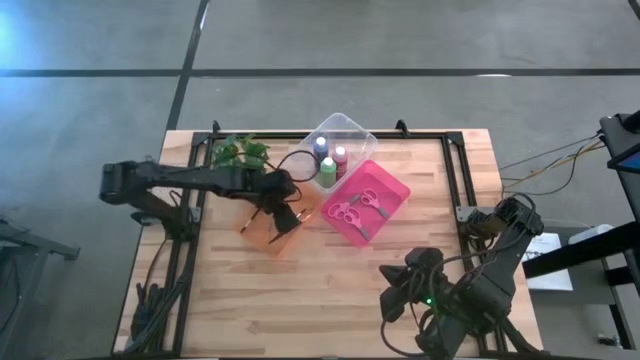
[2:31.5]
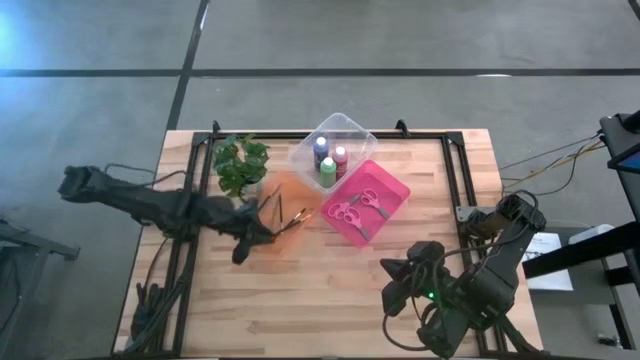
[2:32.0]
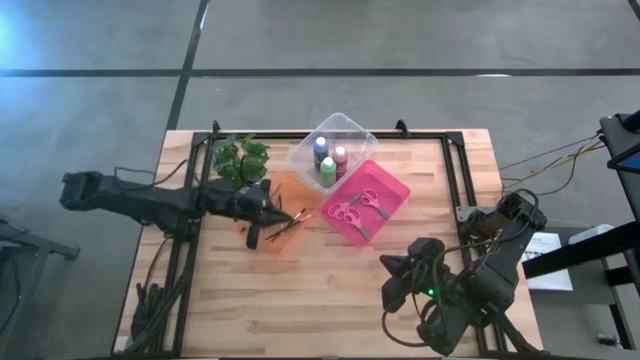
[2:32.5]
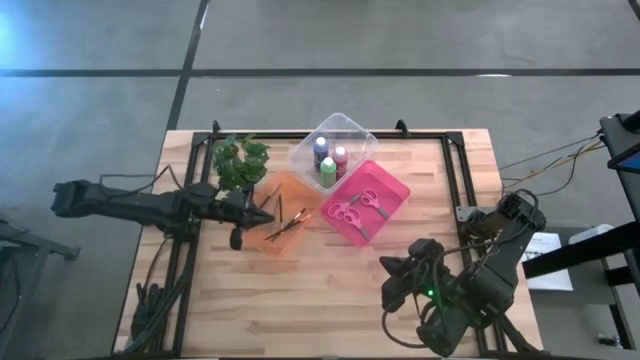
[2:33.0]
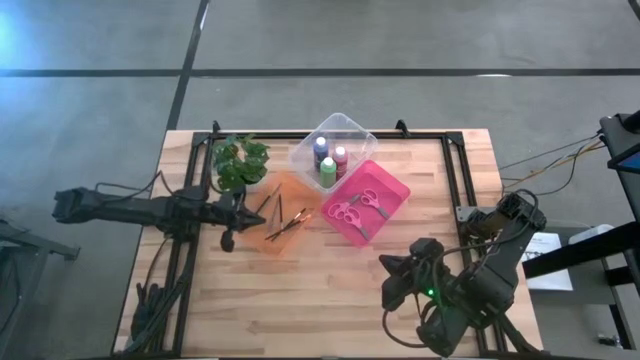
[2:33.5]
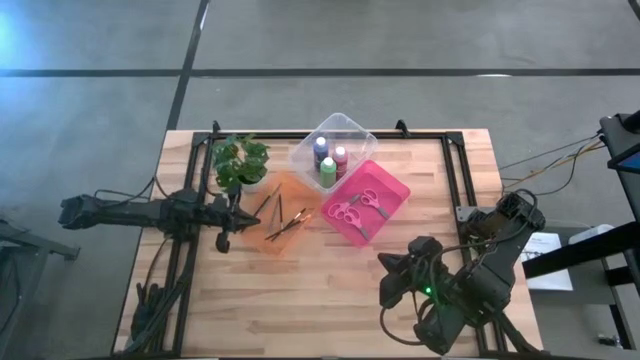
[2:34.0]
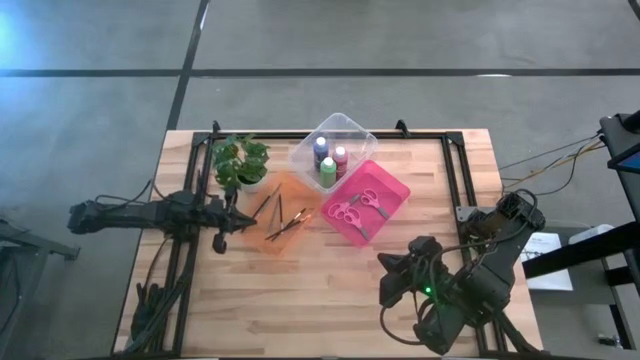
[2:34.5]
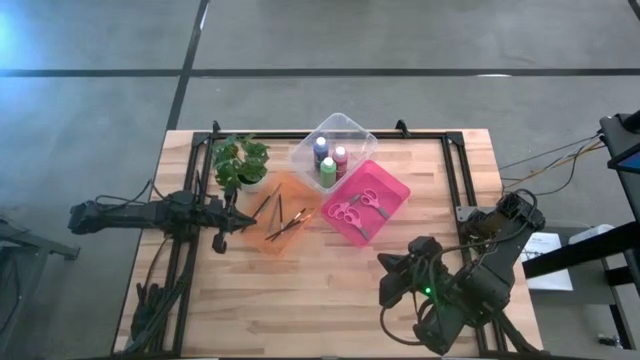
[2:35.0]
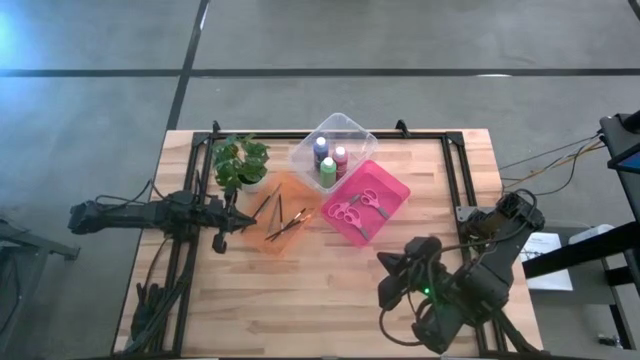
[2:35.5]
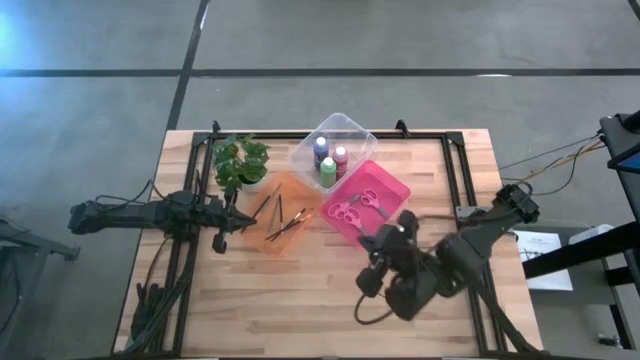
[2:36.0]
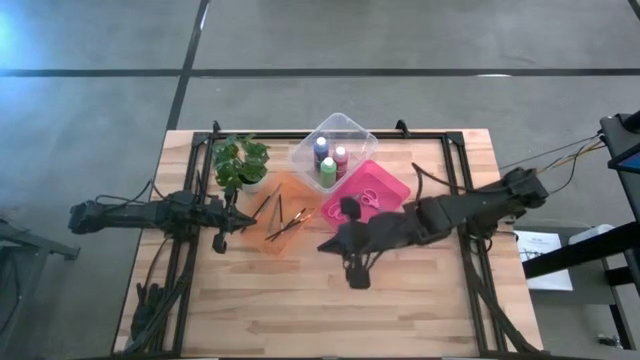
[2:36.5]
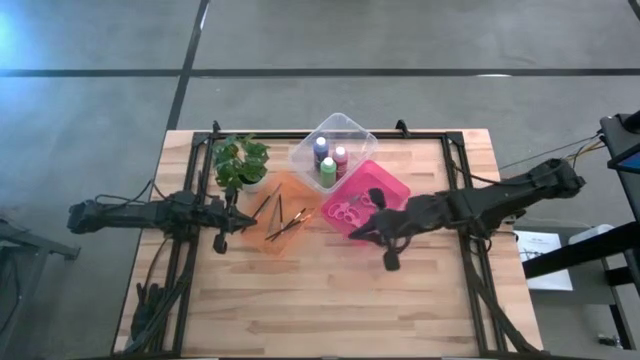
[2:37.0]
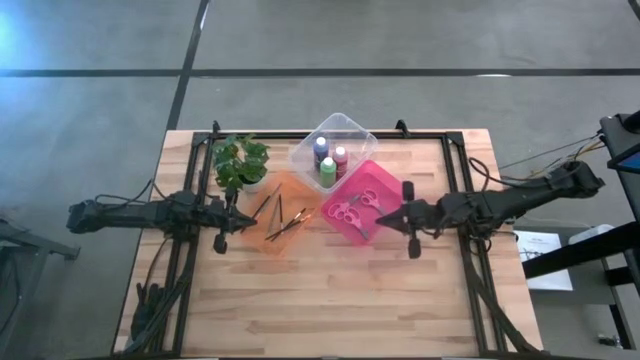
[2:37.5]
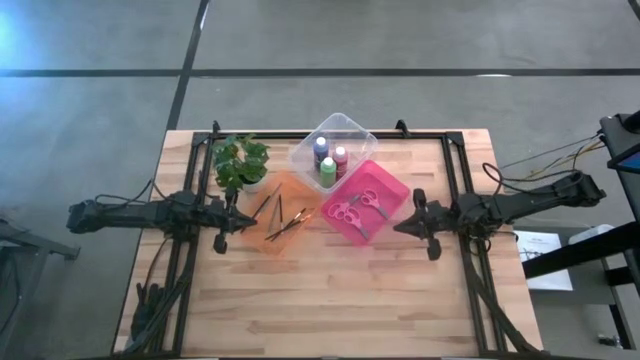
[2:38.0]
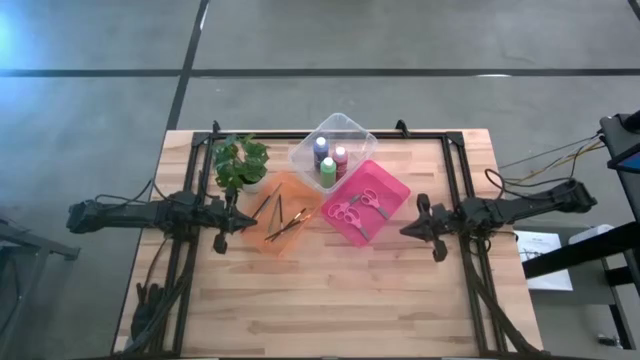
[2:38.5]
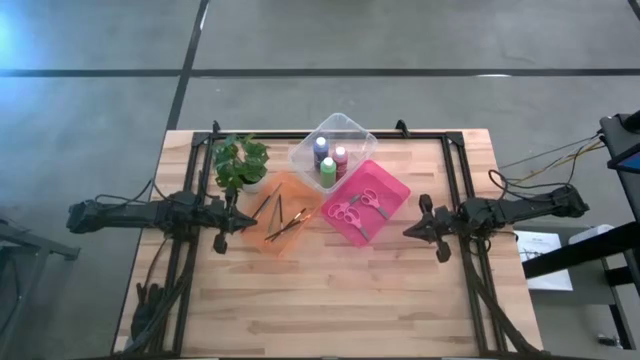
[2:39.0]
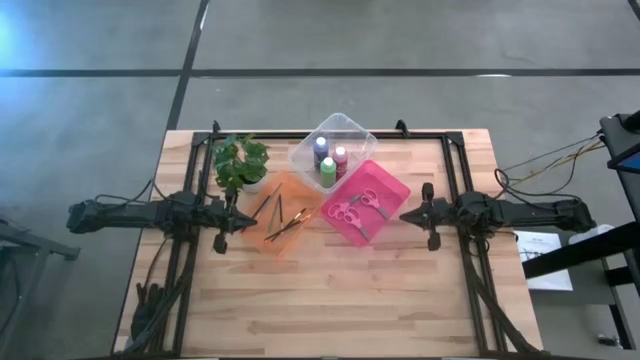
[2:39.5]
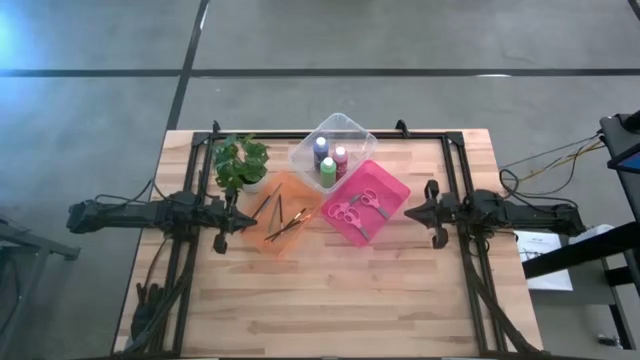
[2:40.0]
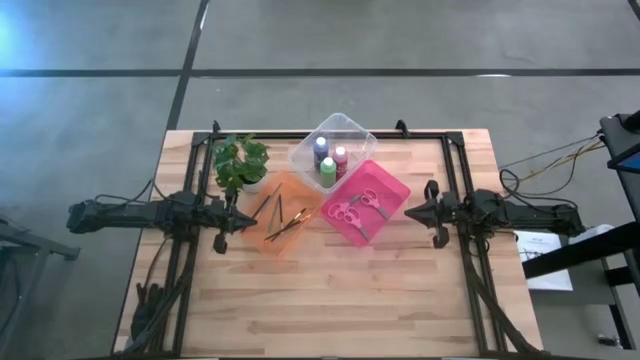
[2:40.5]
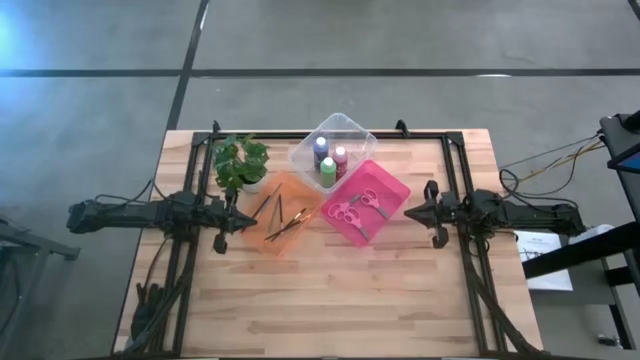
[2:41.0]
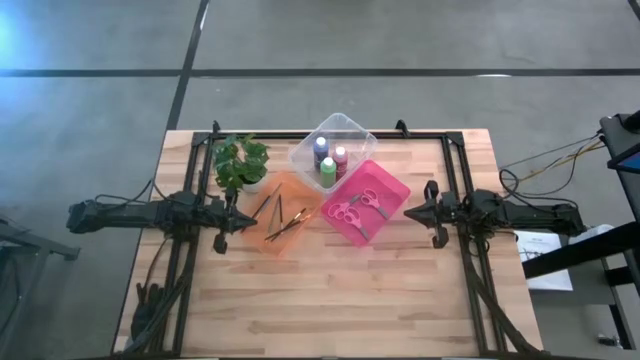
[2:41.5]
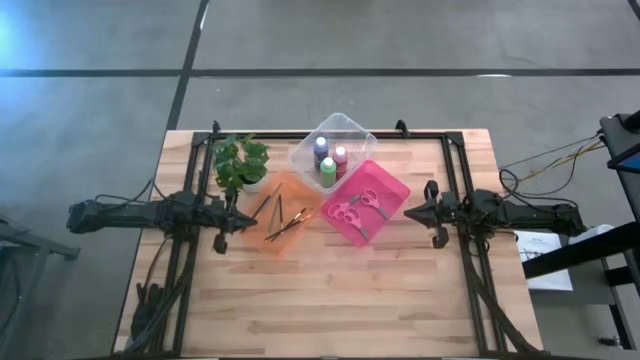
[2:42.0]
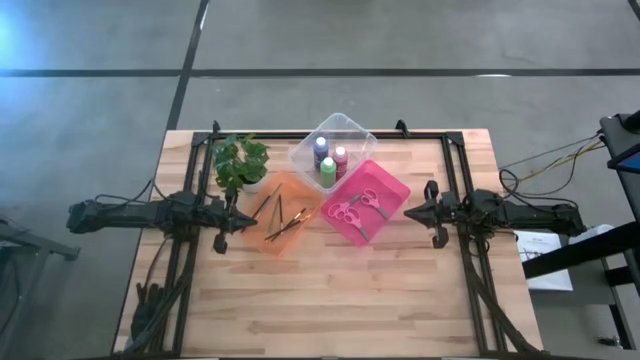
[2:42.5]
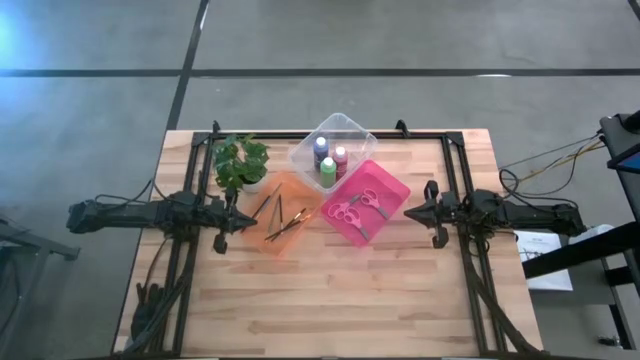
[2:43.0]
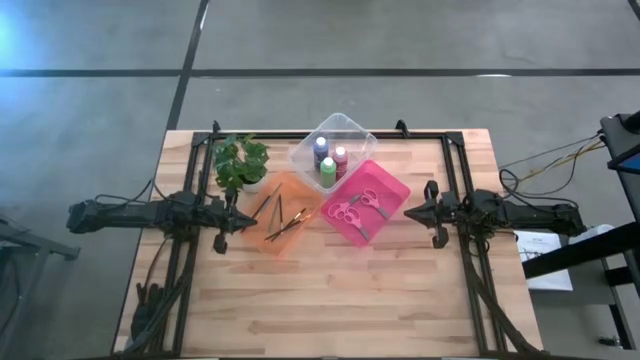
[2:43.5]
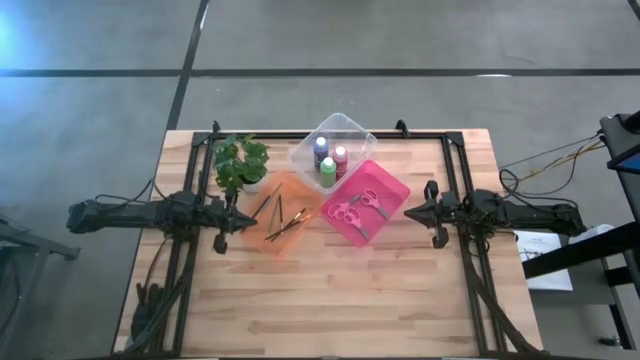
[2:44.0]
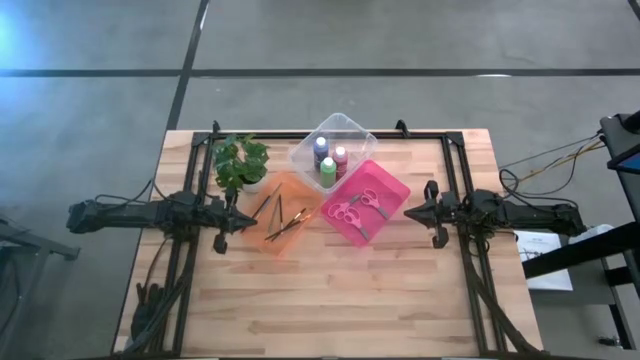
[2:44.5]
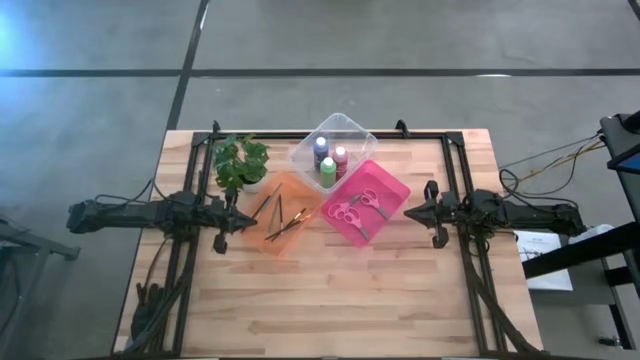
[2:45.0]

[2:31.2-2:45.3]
Task: Pick & Place Paint Supplies
Return to Home Position

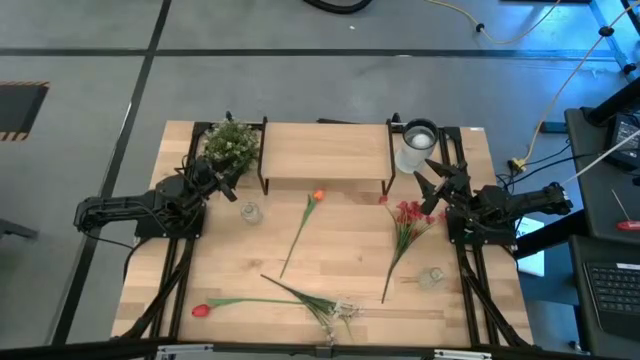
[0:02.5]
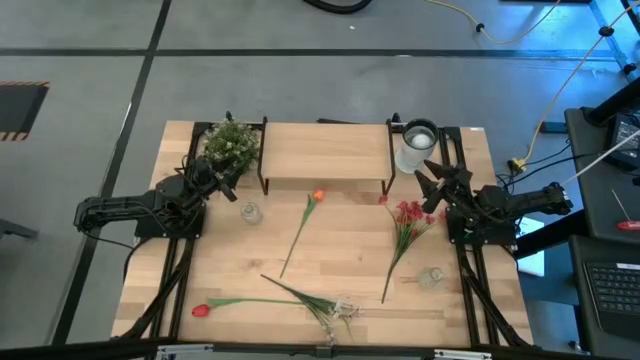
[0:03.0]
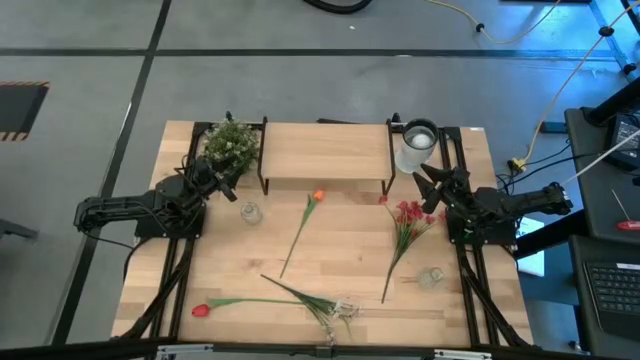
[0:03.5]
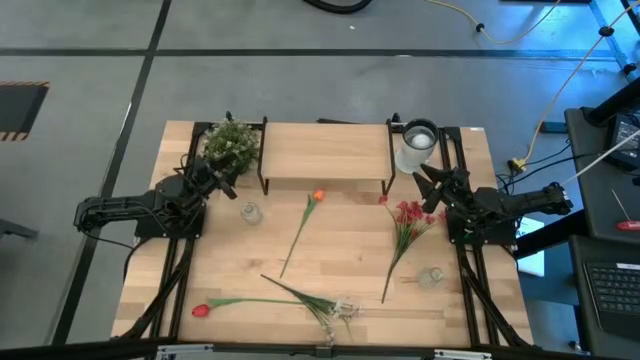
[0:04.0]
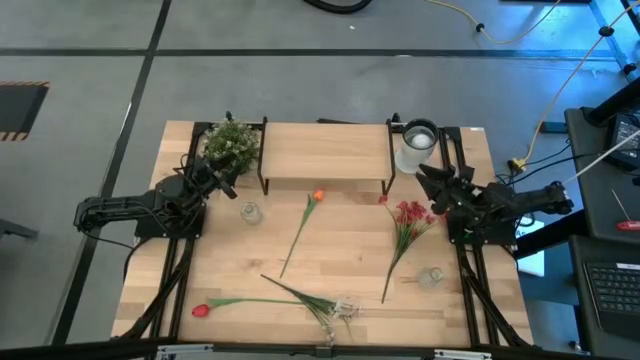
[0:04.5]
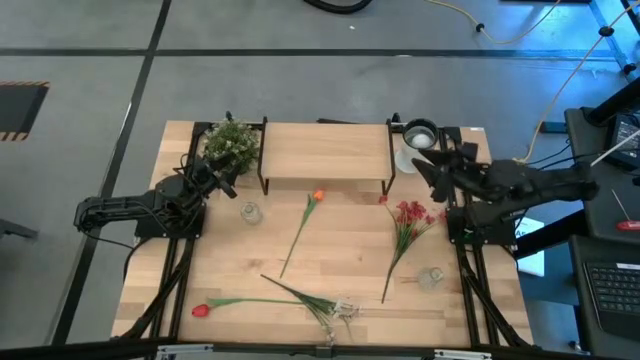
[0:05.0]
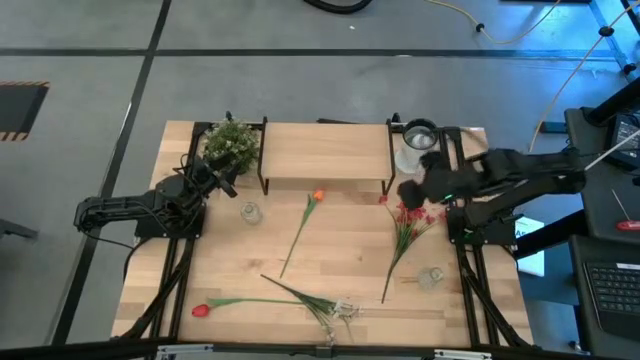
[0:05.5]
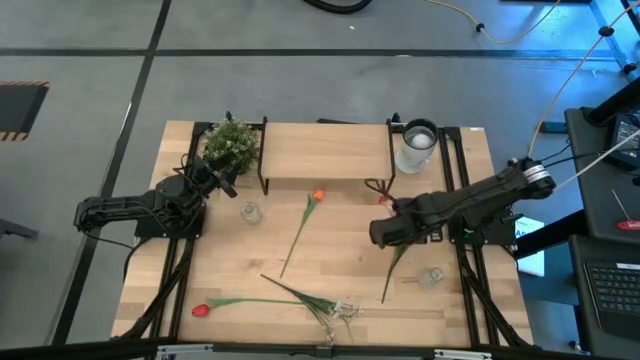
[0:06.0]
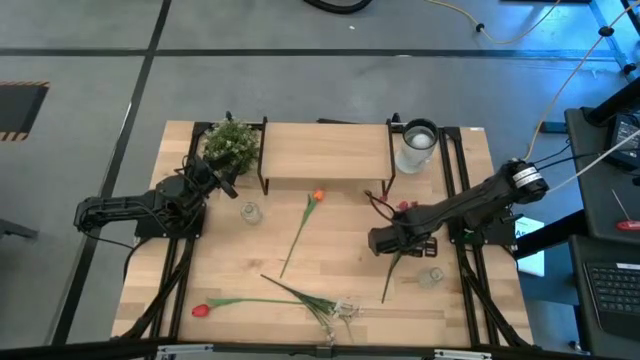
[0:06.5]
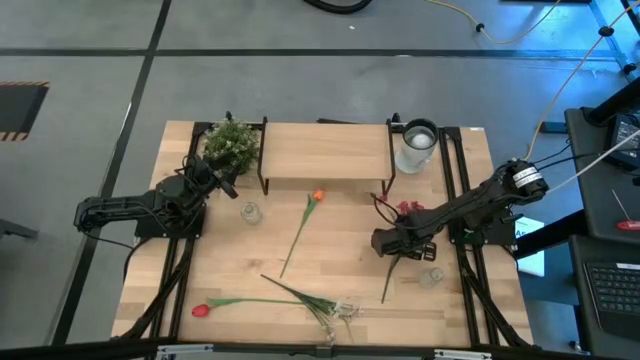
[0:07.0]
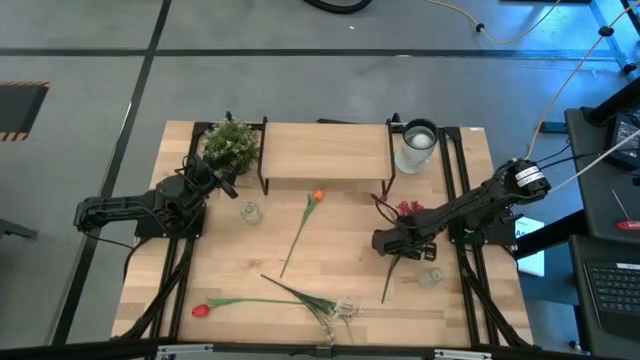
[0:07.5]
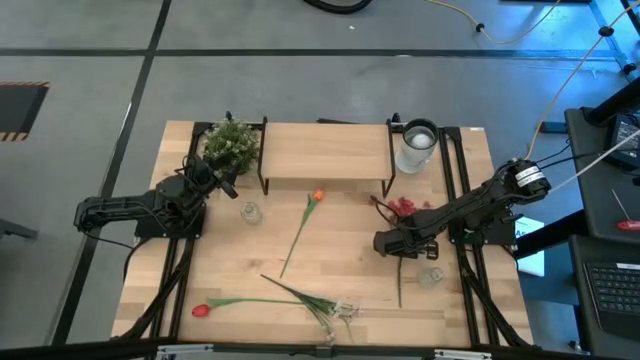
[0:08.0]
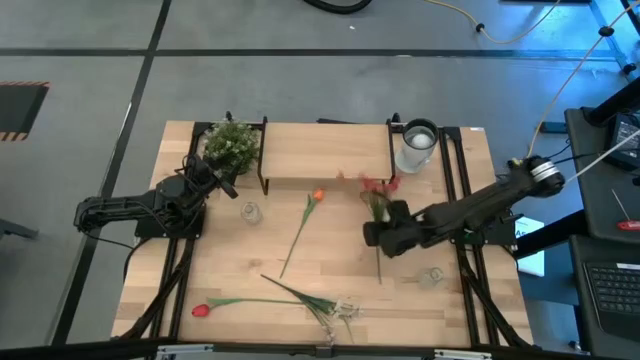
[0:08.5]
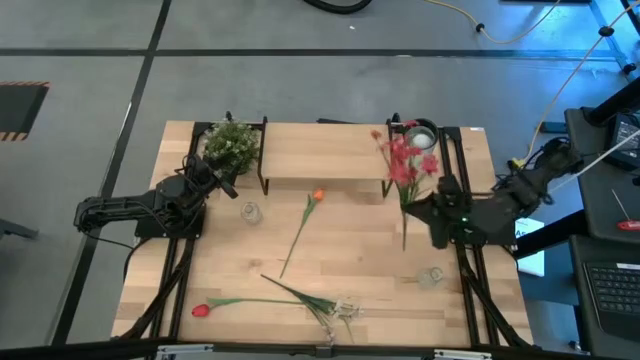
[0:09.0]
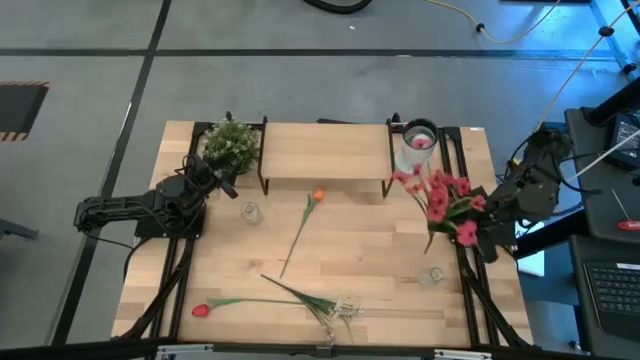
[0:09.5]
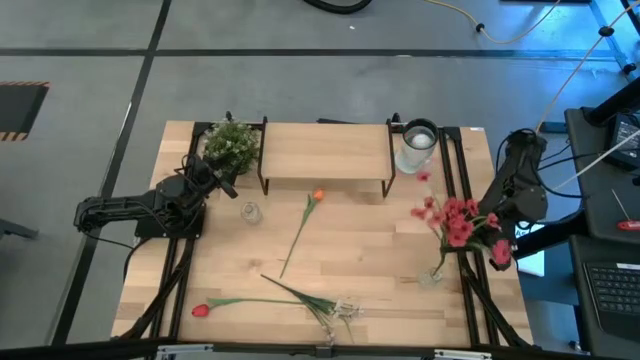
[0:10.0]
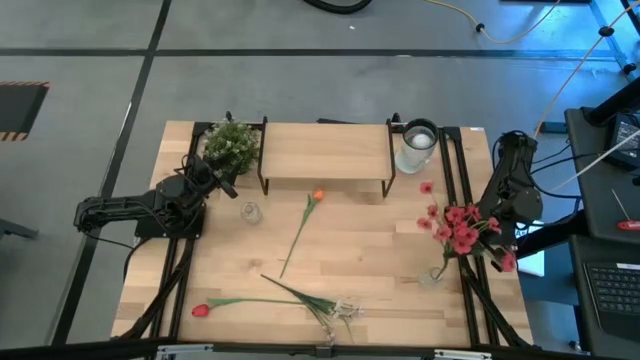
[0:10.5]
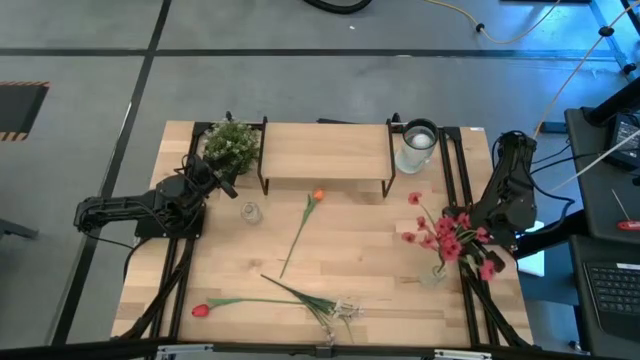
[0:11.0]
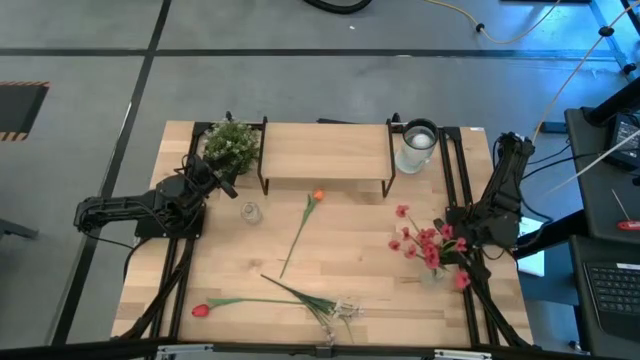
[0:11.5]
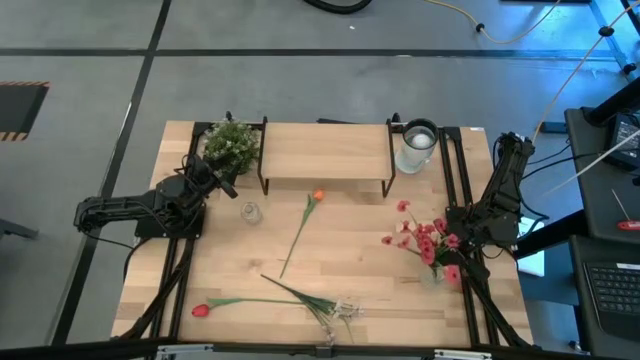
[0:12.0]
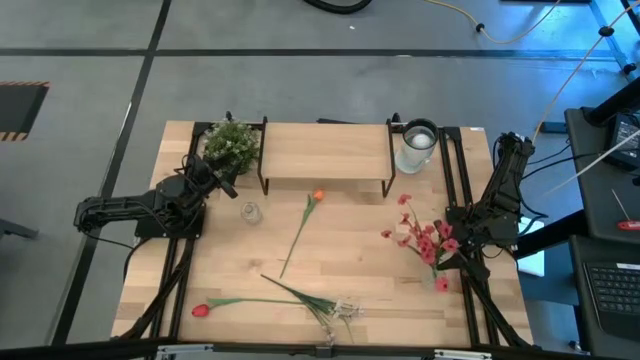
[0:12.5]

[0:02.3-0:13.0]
Task: Pick and place flowers into a vace then onto a shelf
Put the bottom red flowers into the bottom transparent vase
